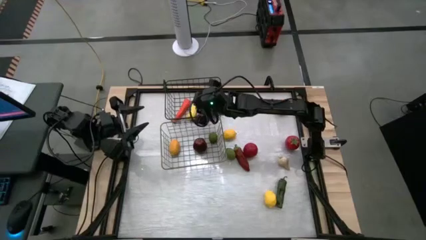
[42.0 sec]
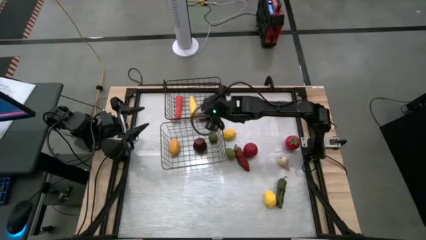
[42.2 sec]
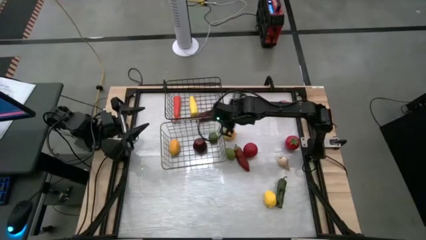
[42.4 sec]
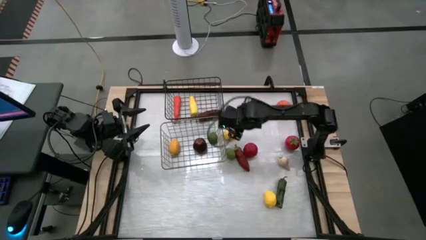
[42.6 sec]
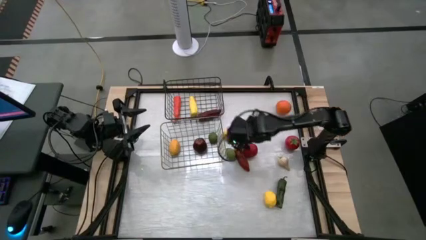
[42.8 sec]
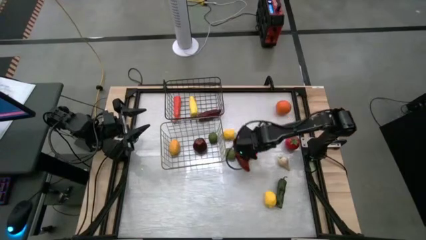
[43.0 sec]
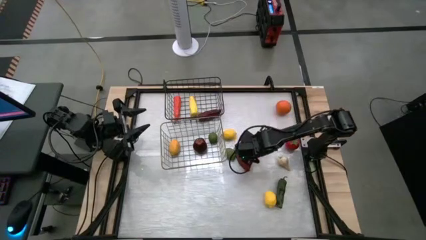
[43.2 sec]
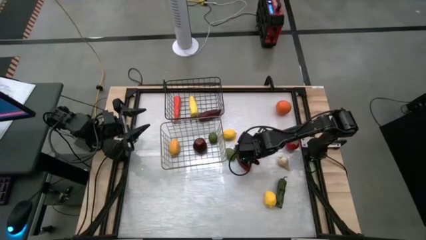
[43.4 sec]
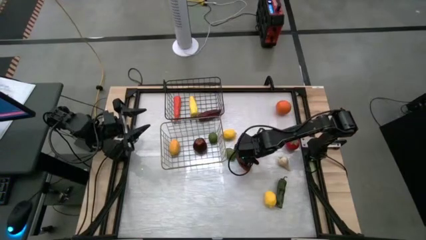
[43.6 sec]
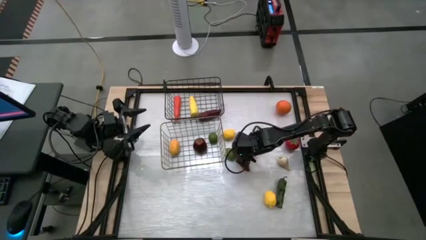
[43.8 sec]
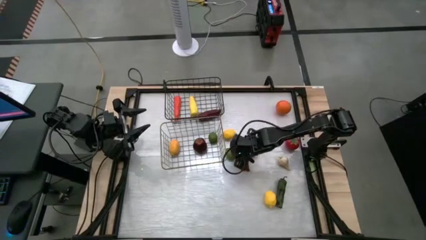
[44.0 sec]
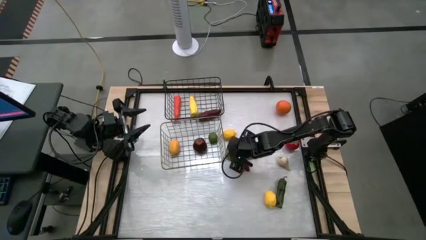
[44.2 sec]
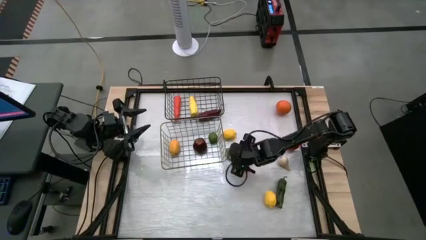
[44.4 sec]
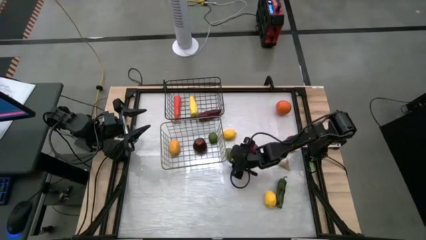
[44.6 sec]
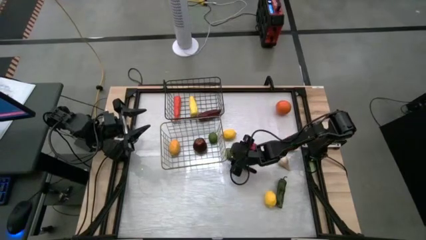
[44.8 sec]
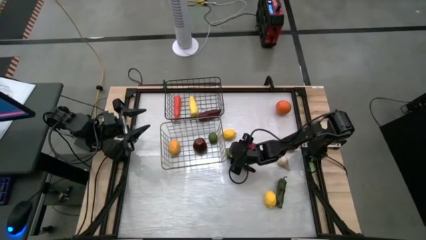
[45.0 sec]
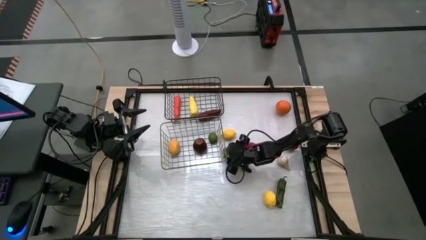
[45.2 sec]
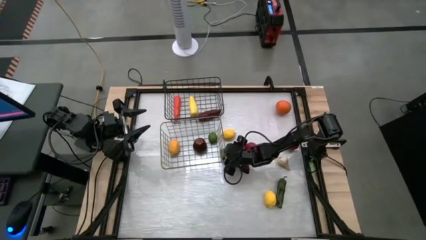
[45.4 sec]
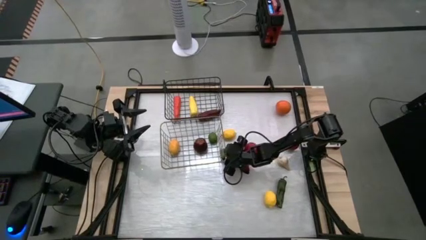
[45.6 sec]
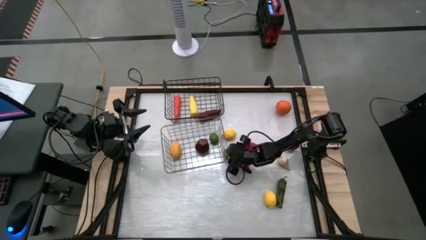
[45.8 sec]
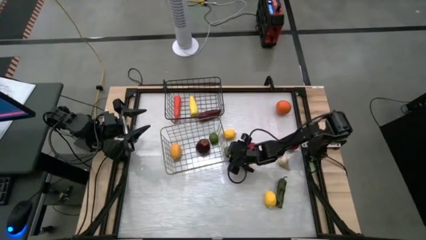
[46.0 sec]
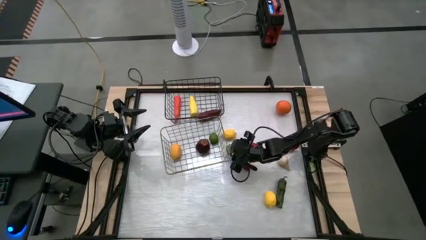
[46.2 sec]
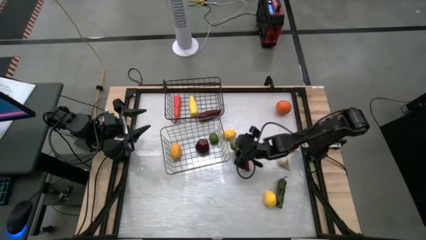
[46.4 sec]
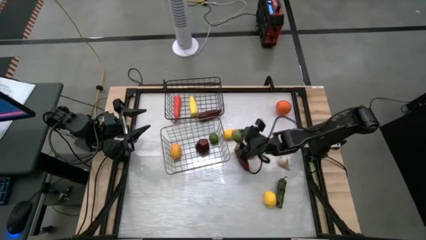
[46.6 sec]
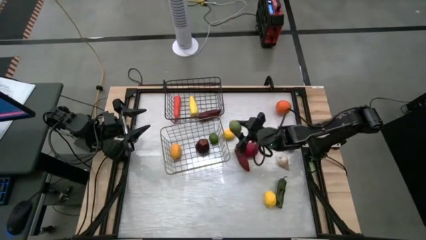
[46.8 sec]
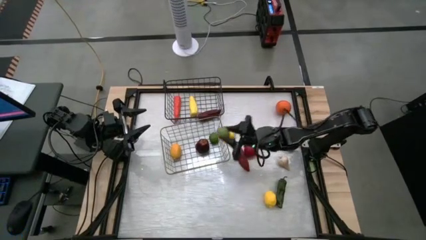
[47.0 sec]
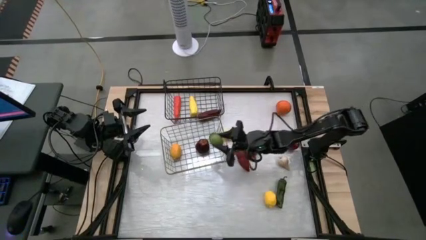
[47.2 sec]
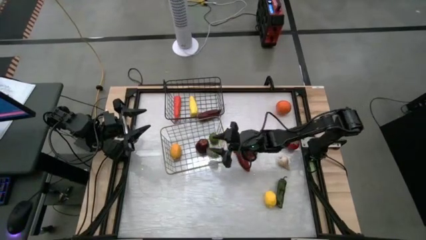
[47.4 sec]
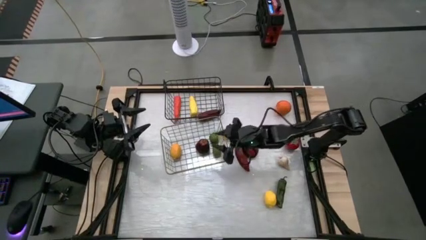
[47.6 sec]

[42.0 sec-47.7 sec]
Task: Sort produce into baskets
Put the green lime into the brown wire basket

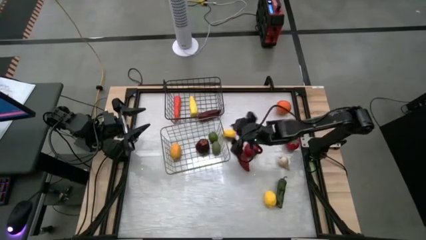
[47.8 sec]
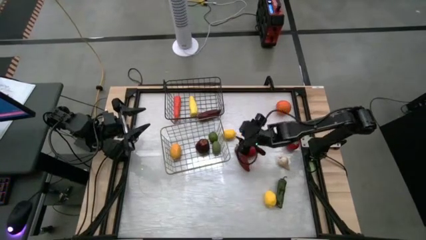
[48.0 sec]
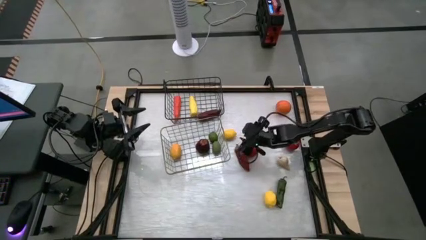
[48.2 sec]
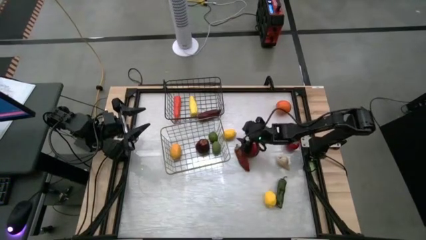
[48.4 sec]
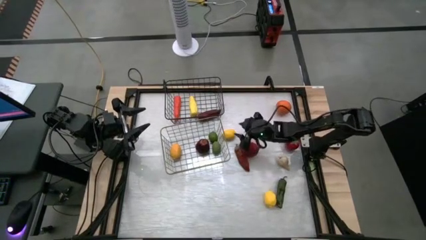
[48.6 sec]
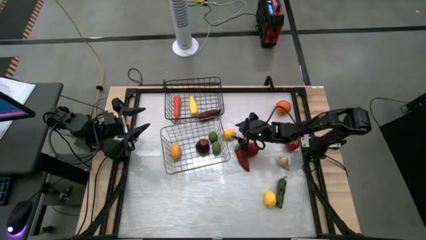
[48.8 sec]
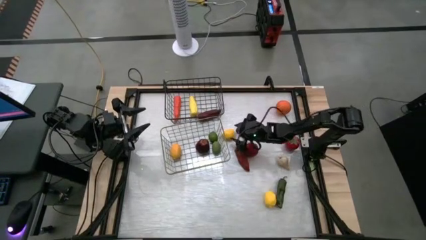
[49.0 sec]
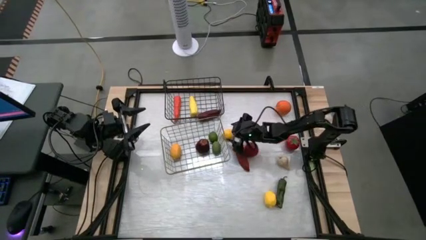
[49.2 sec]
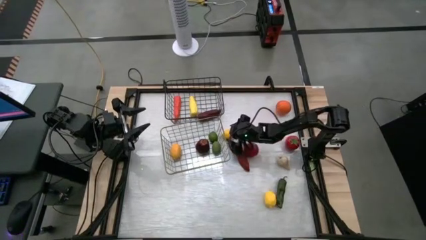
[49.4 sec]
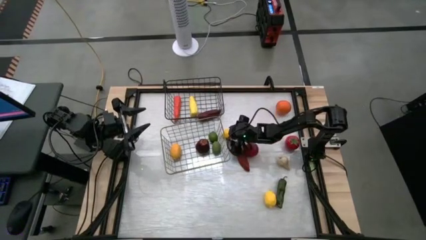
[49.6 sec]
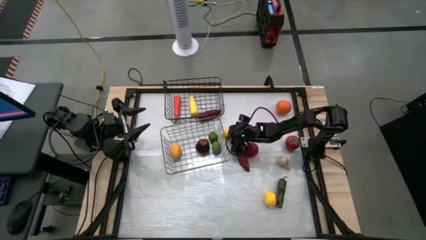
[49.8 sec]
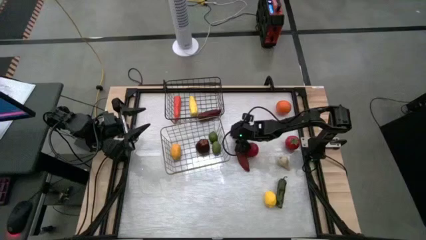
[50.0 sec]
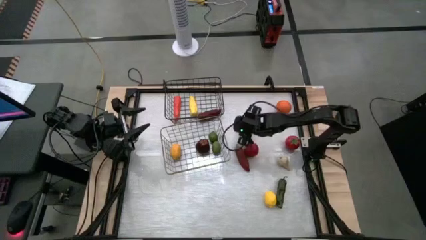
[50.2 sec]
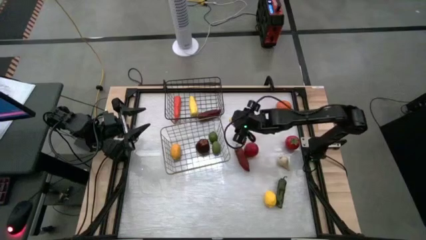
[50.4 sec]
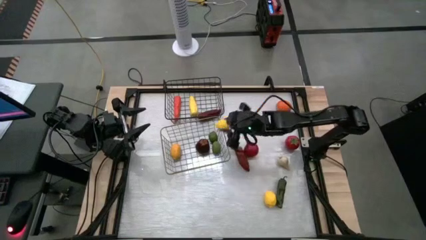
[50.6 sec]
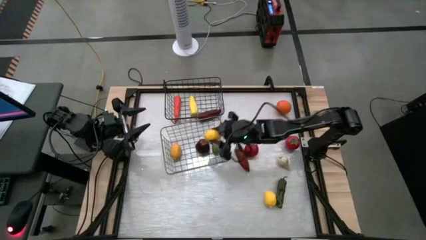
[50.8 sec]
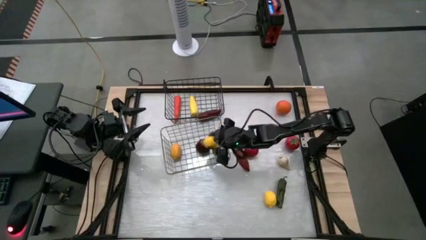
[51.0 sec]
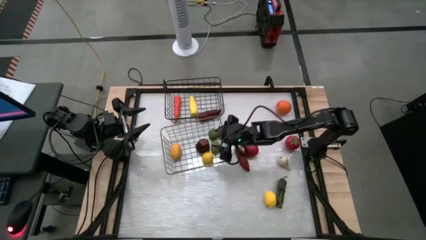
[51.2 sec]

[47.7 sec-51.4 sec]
Put the top yellow lemon into the brown wire basket

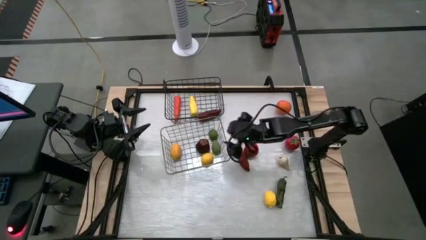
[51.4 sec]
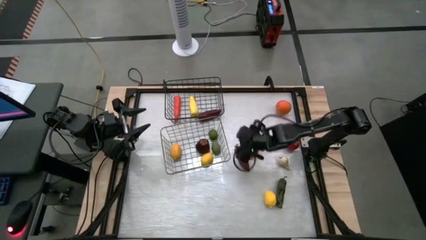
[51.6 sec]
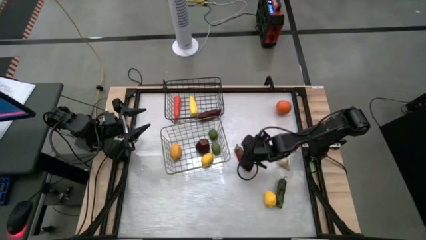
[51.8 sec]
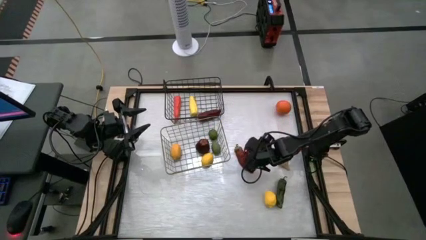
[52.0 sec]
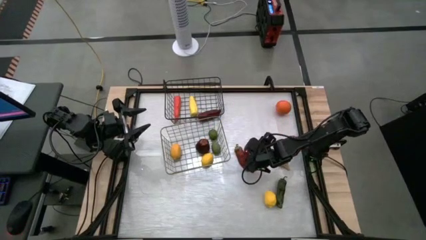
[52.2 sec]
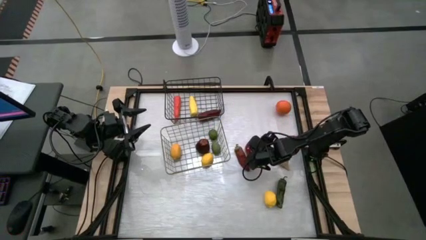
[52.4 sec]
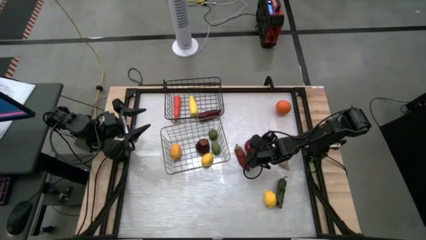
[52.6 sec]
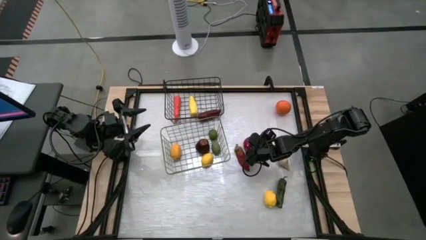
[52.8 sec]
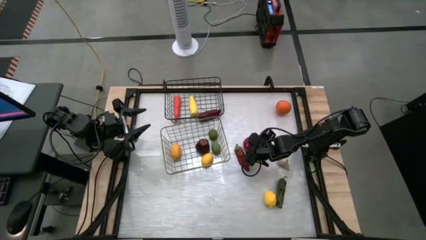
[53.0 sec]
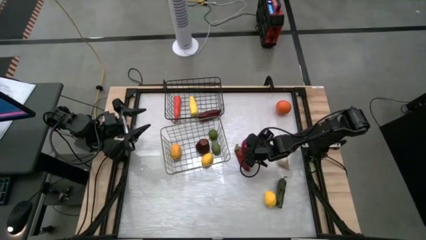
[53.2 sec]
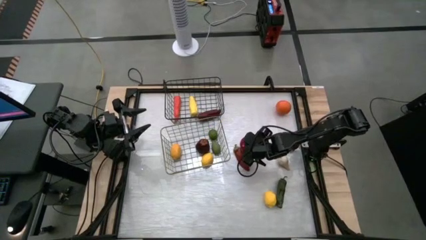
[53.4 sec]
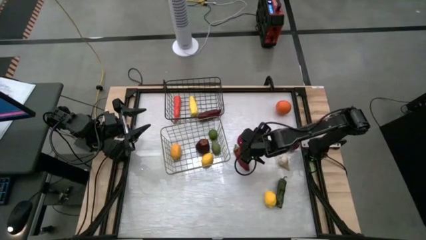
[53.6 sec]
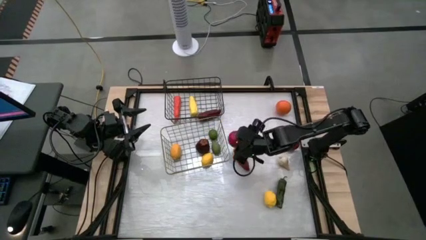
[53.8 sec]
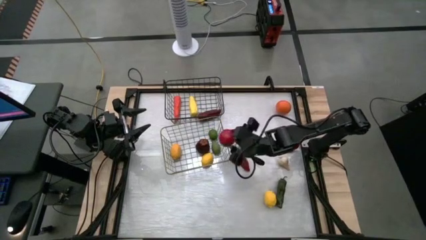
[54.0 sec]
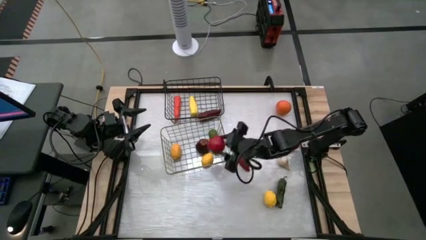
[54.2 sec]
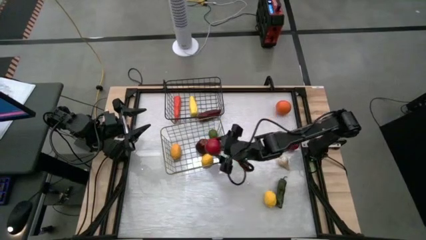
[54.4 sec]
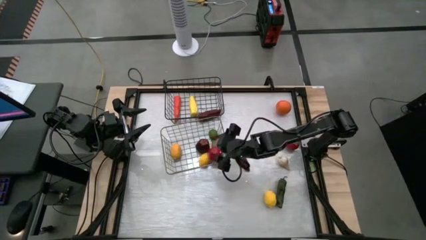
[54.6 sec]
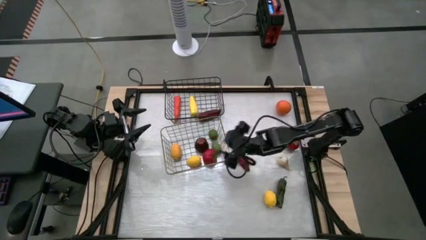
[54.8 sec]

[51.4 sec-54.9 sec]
Put the left red tomato into the brown wire basket

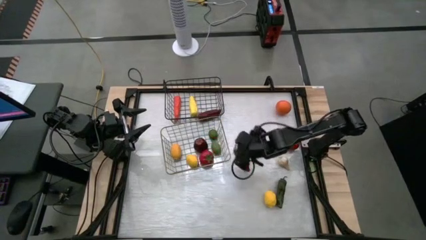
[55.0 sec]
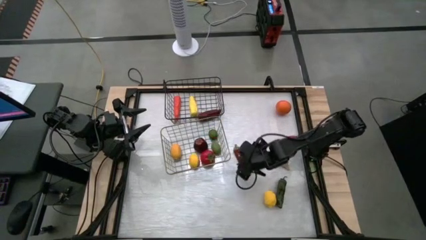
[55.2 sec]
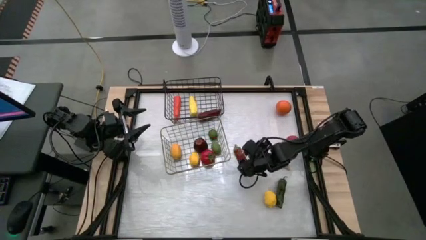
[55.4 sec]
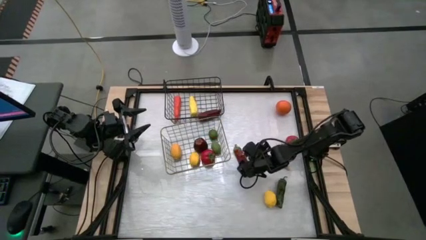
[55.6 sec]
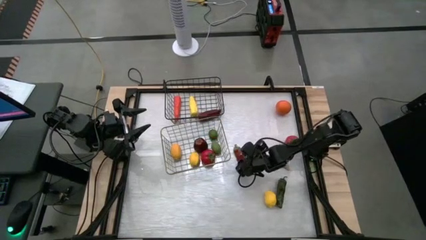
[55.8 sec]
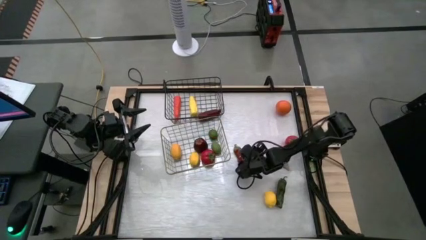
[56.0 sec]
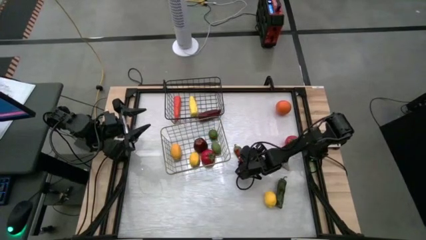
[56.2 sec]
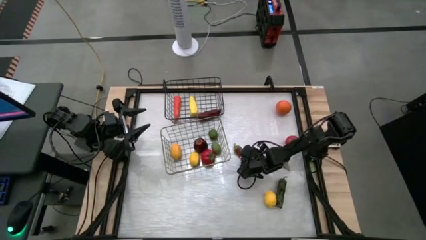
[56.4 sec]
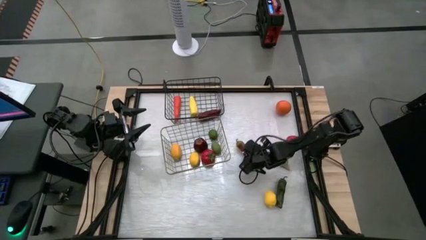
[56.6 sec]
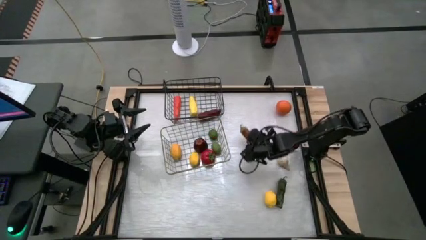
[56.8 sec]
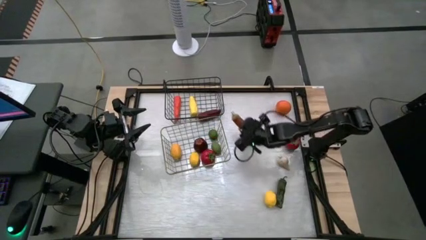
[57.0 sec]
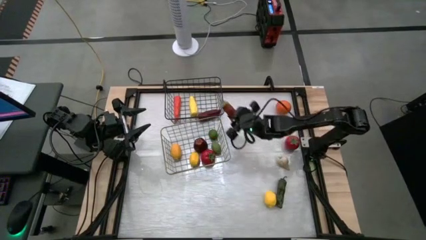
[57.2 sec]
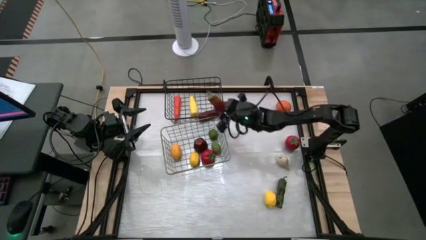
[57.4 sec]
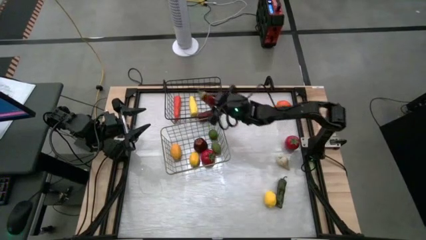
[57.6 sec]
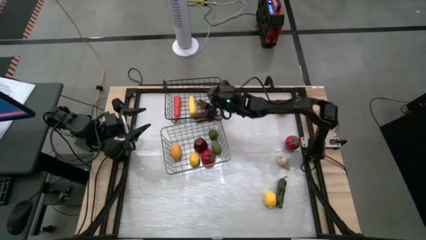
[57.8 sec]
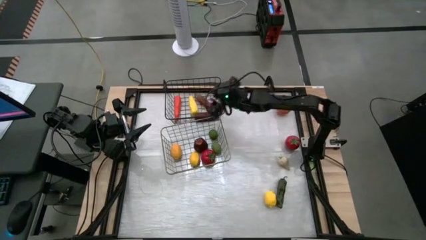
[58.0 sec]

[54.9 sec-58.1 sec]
Put the red chili pepper into the black wire basket

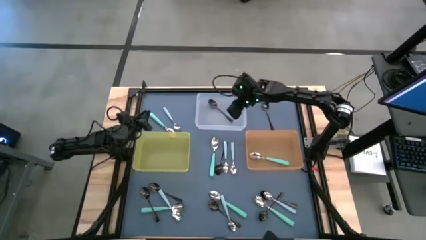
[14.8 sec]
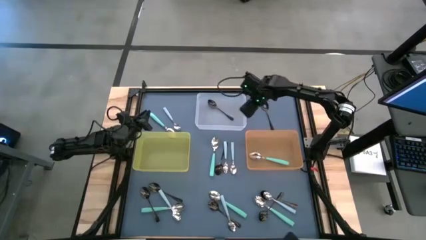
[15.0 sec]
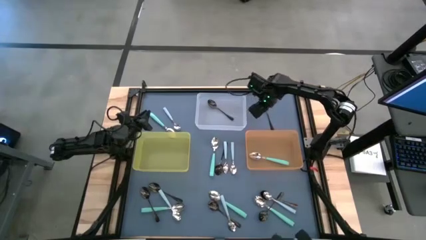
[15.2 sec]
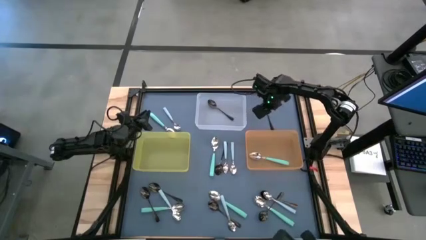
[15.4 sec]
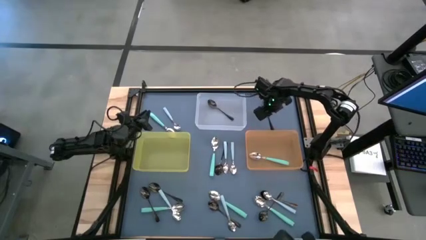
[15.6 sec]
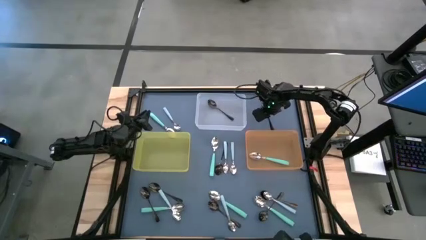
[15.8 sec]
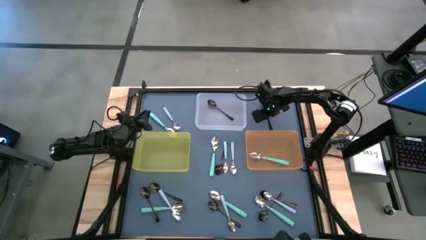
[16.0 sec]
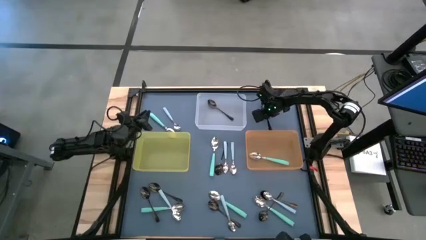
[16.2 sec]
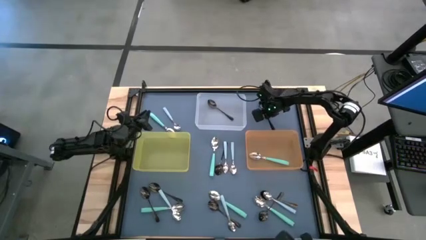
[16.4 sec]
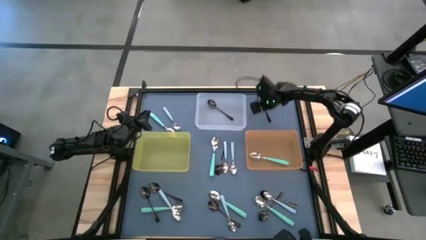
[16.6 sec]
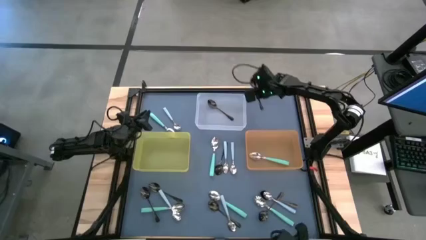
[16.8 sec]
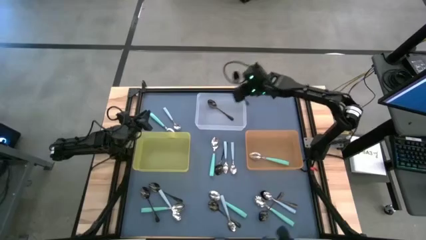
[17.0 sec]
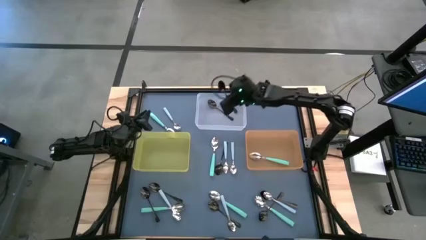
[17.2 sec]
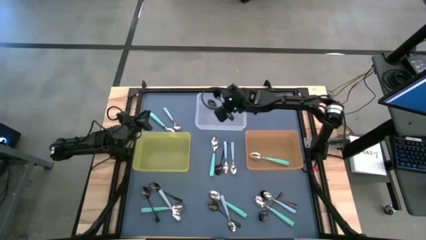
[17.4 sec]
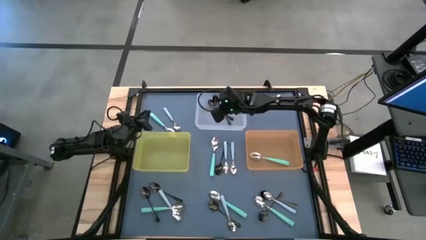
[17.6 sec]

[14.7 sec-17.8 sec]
Task: Sort silverware by color (type)
Put the black spoon into the transparent bin
